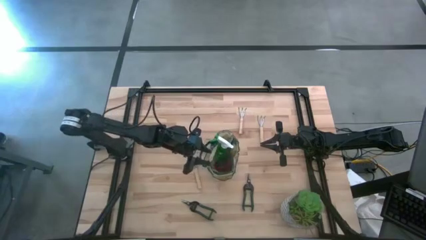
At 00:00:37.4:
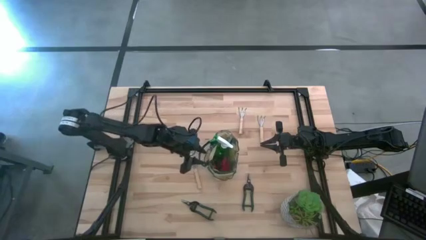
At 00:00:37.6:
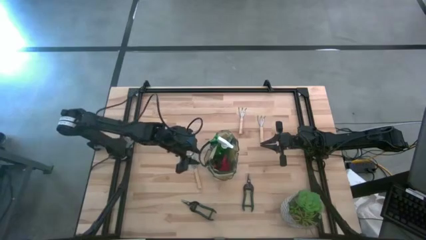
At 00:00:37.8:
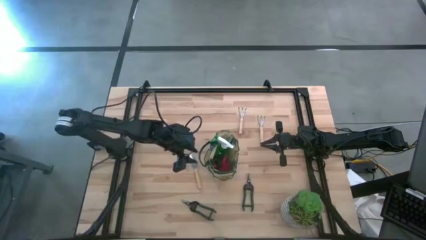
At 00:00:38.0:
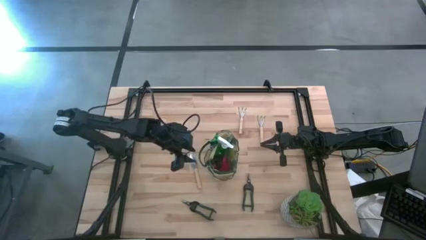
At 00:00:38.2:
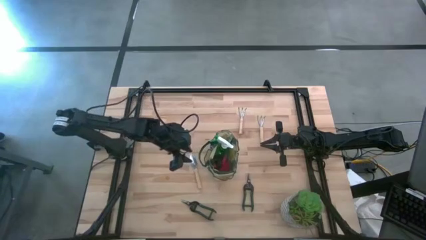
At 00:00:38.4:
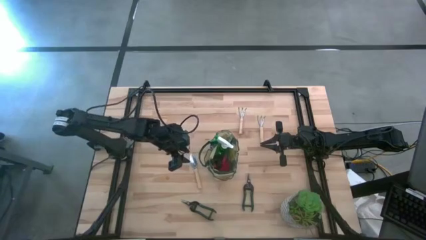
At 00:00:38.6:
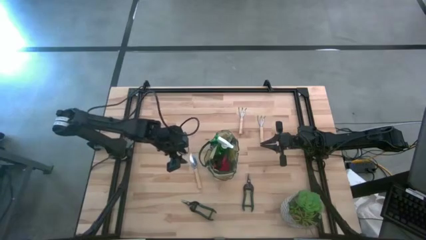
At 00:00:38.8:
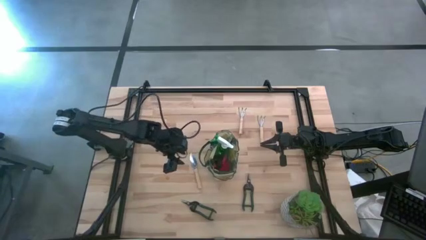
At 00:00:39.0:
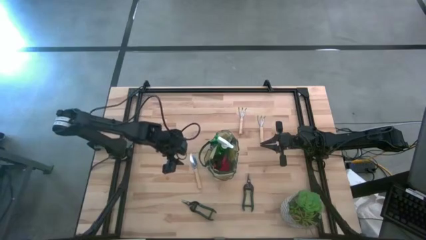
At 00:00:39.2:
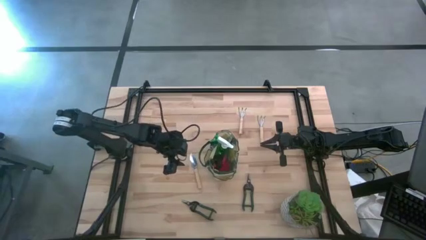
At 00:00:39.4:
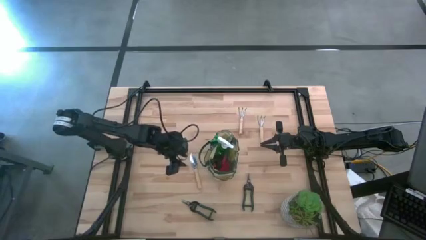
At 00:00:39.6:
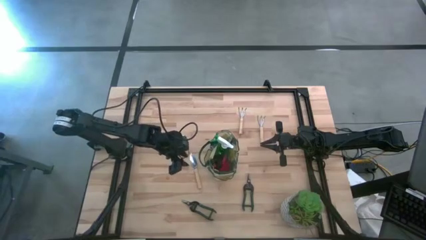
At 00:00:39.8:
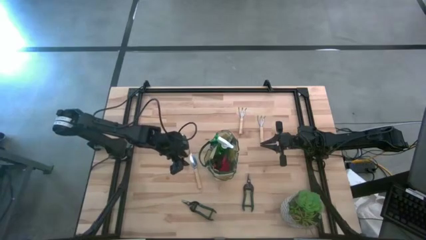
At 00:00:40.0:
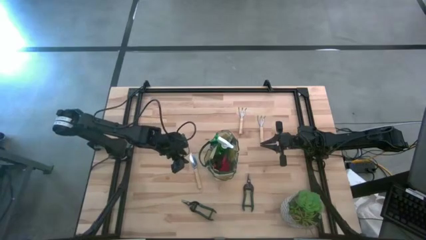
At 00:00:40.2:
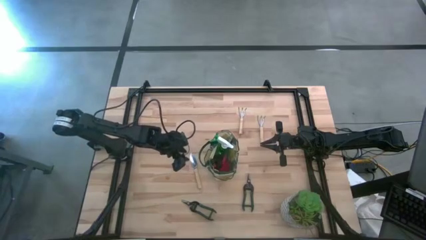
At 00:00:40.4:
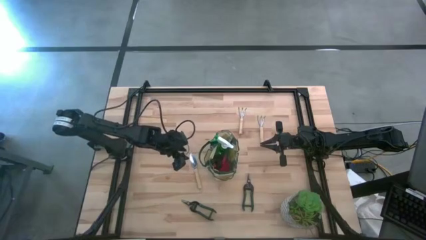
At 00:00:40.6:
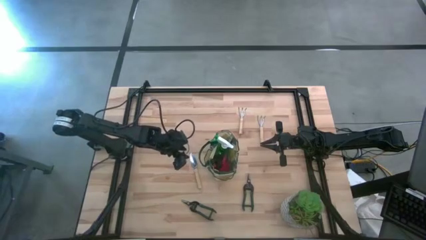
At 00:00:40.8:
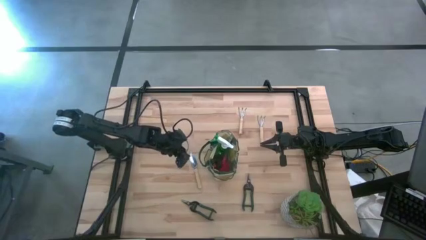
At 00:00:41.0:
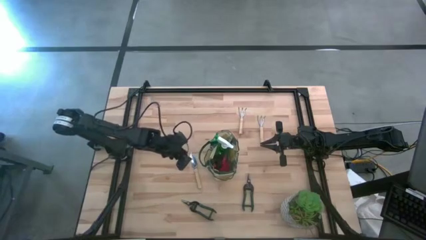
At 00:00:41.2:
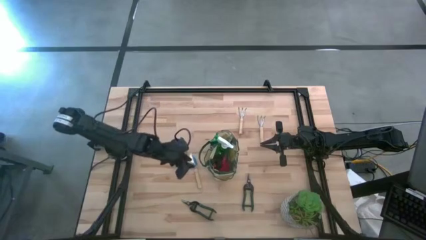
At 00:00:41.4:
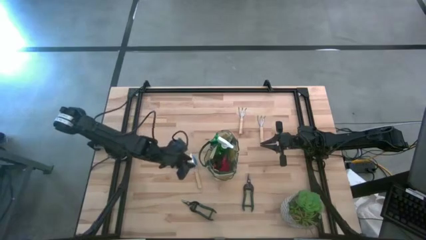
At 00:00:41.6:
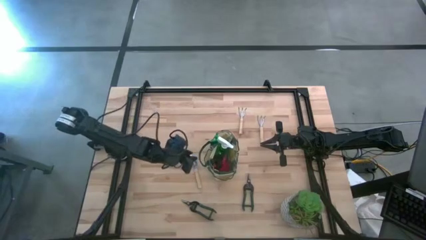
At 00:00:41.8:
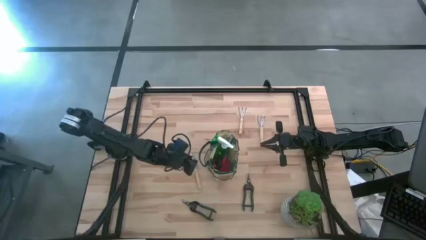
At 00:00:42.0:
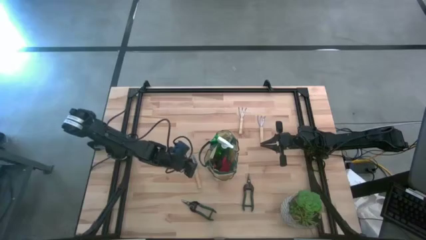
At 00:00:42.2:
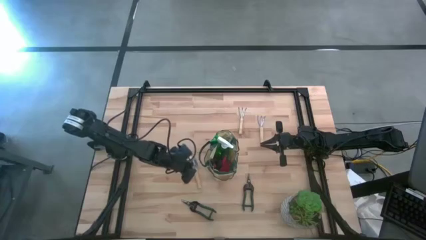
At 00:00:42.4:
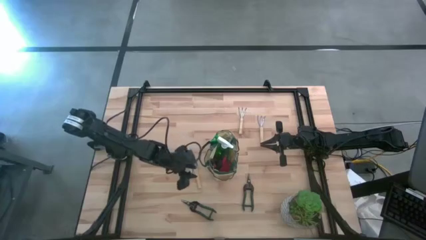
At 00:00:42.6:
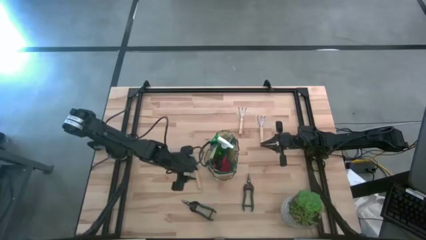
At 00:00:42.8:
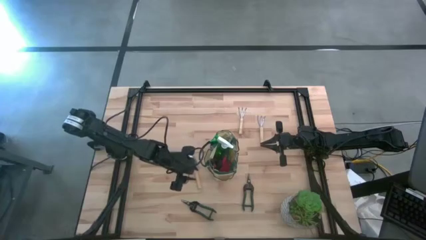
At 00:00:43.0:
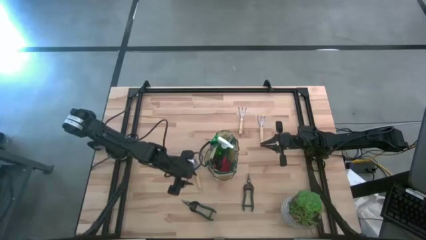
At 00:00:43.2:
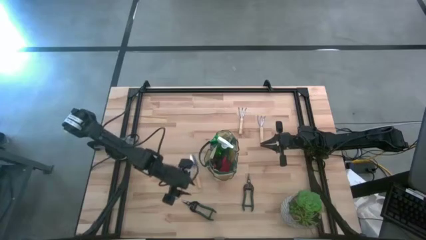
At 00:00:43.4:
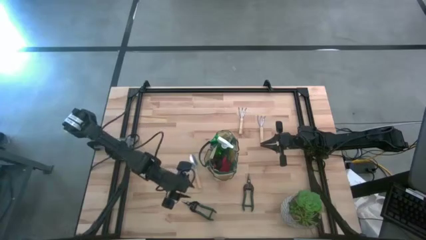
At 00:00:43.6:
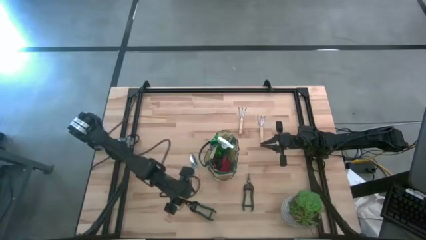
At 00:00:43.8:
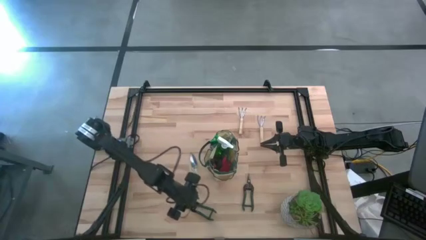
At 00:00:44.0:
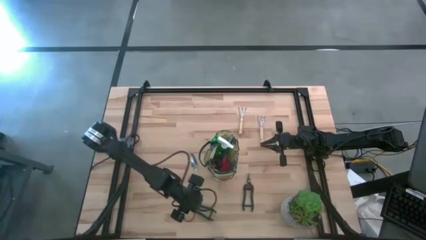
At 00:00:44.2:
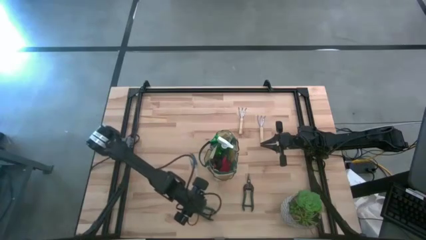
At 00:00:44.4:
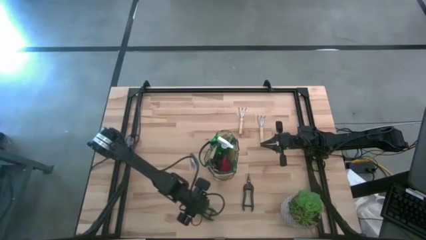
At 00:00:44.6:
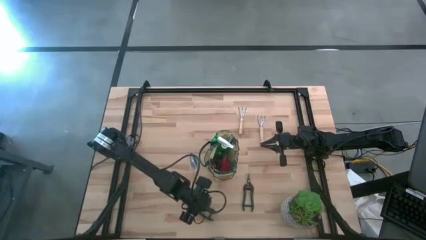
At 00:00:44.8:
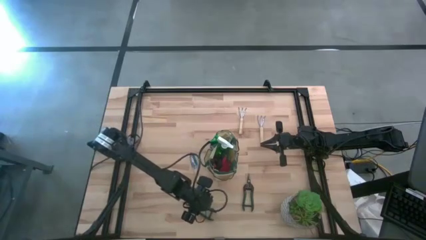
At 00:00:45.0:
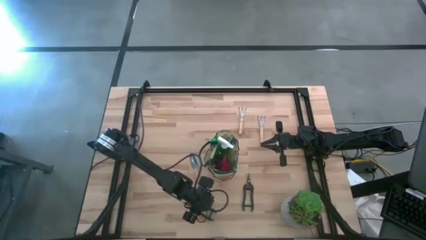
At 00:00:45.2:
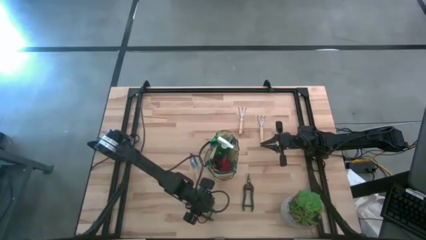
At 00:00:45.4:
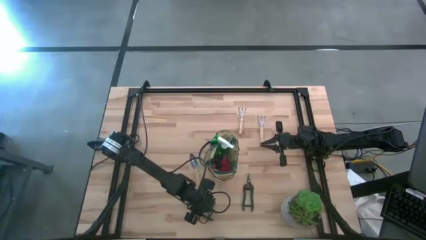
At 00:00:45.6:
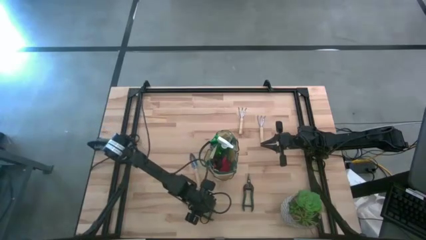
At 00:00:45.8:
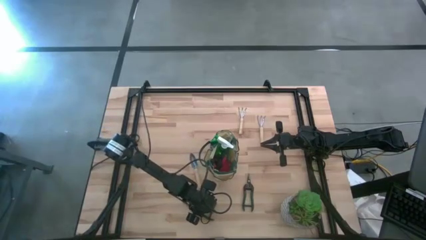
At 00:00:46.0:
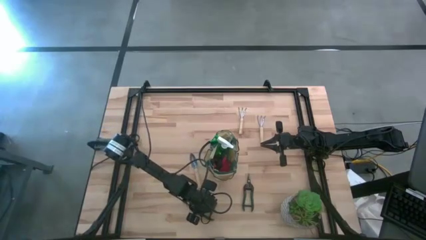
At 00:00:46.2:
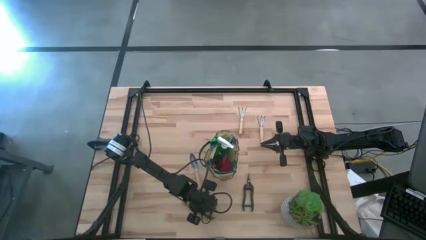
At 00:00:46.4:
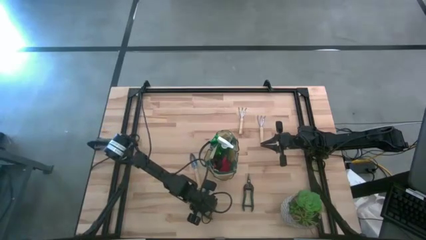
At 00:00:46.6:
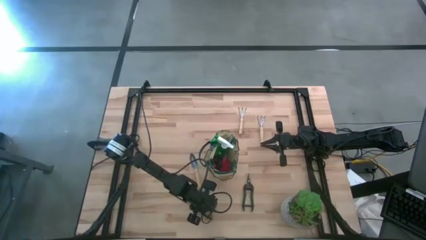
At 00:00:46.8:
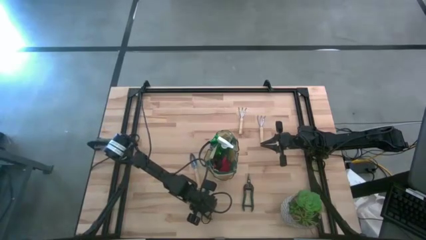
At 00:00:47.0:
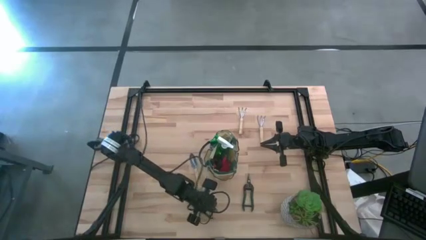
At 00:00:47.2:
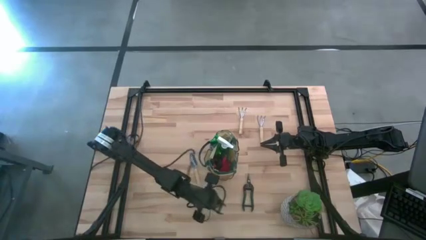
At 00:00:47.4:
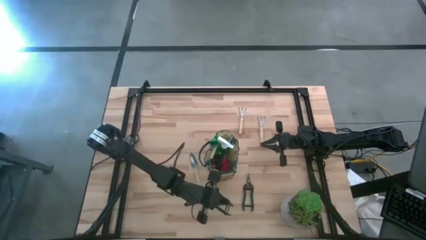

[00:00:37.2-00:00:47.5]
Task: Pick & Place Garden tools in Gardening bag
Put the left green shear scissors into the white gardening bag

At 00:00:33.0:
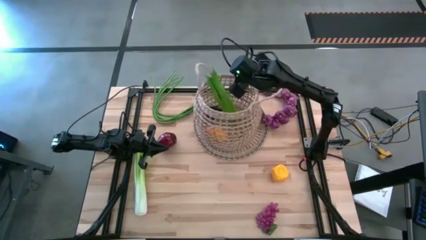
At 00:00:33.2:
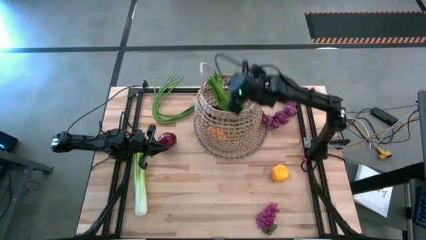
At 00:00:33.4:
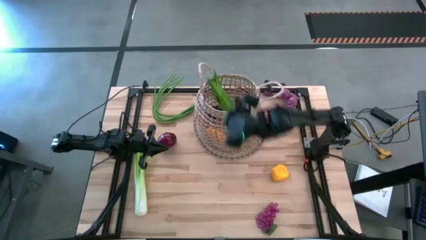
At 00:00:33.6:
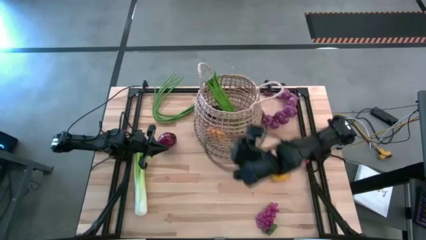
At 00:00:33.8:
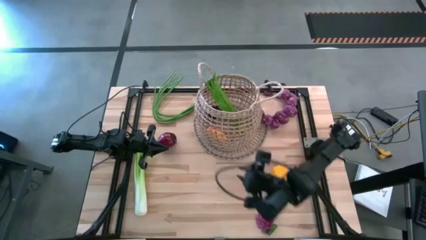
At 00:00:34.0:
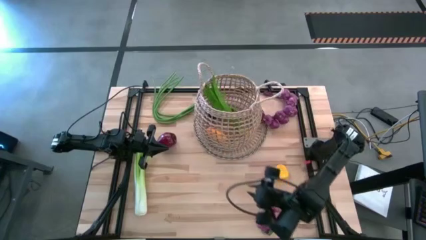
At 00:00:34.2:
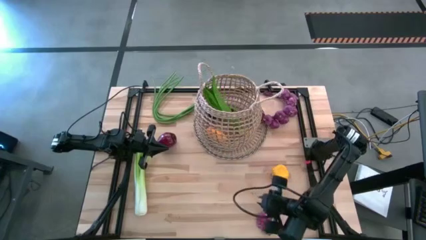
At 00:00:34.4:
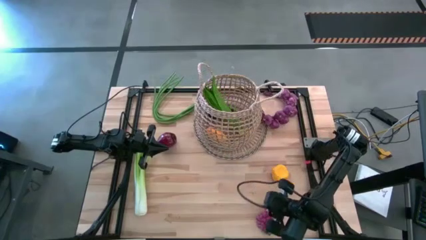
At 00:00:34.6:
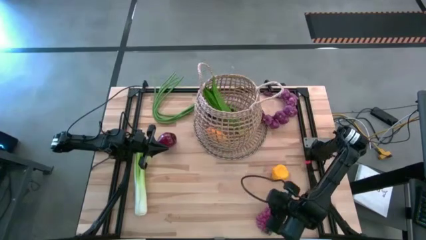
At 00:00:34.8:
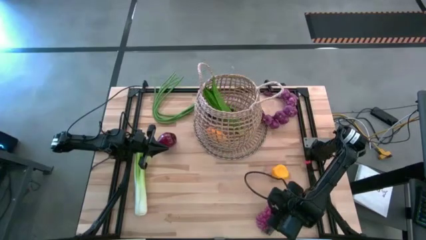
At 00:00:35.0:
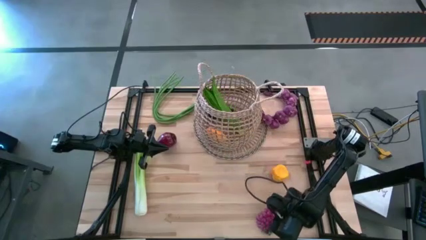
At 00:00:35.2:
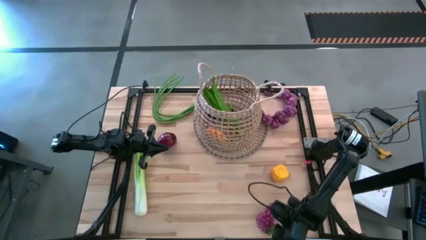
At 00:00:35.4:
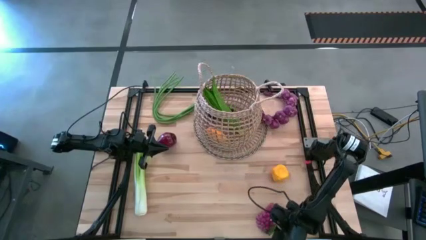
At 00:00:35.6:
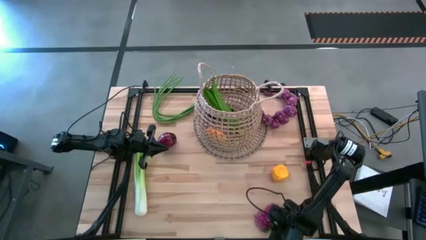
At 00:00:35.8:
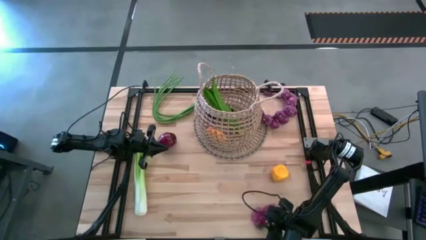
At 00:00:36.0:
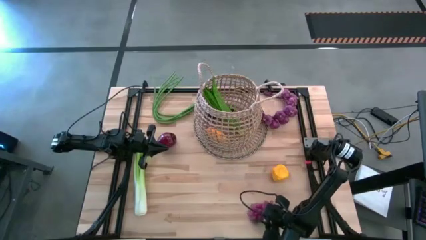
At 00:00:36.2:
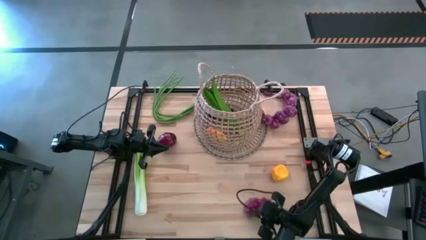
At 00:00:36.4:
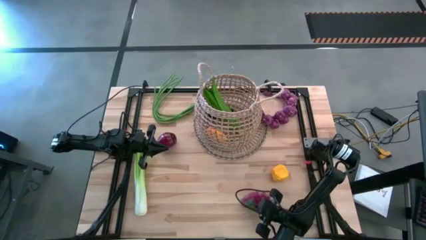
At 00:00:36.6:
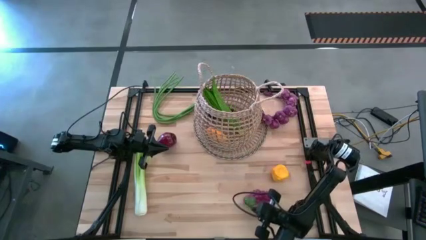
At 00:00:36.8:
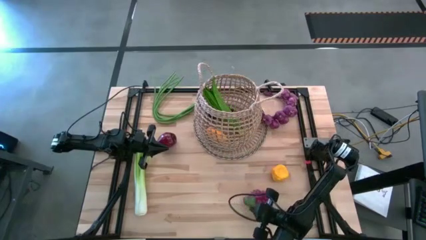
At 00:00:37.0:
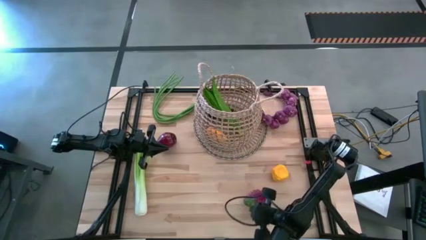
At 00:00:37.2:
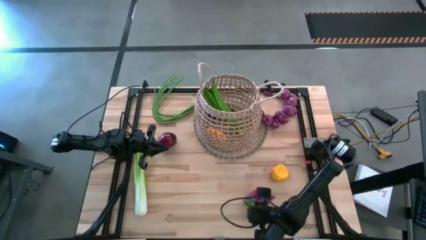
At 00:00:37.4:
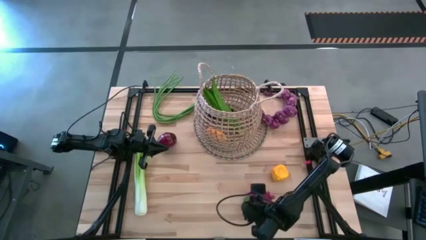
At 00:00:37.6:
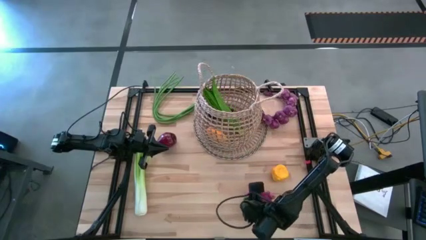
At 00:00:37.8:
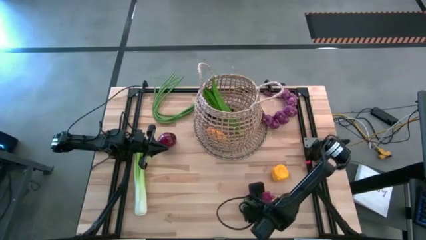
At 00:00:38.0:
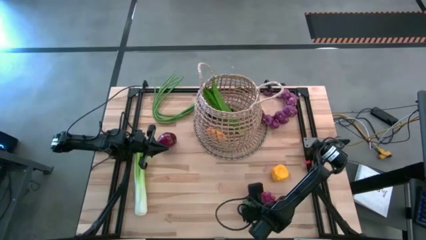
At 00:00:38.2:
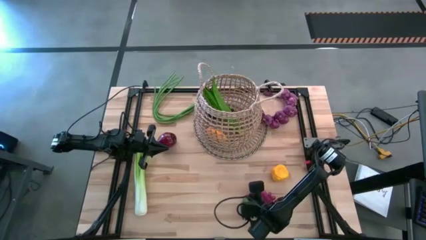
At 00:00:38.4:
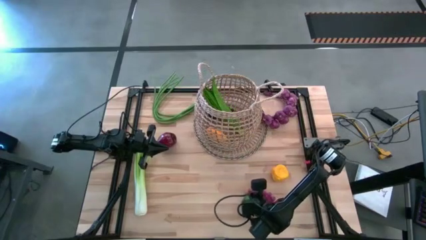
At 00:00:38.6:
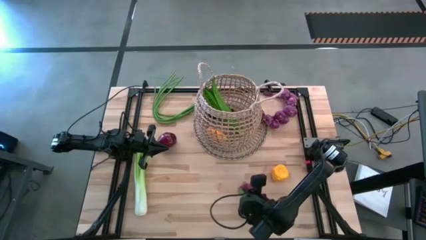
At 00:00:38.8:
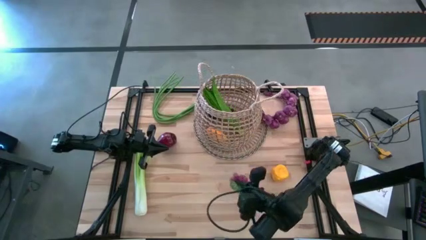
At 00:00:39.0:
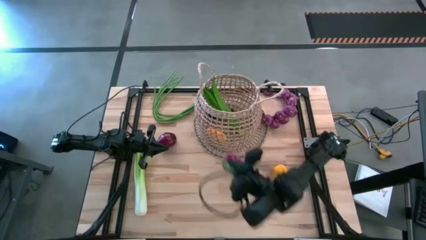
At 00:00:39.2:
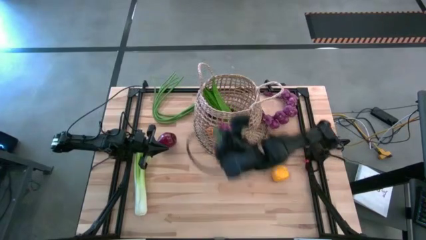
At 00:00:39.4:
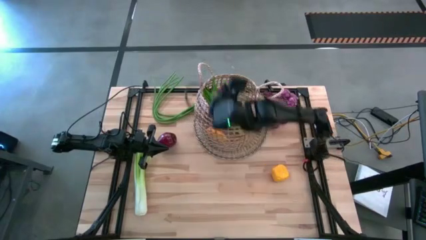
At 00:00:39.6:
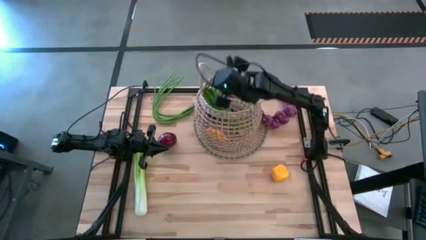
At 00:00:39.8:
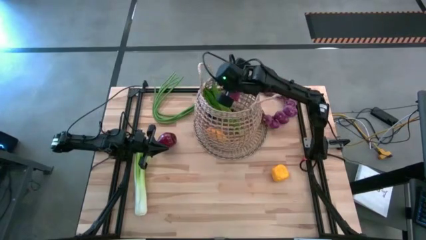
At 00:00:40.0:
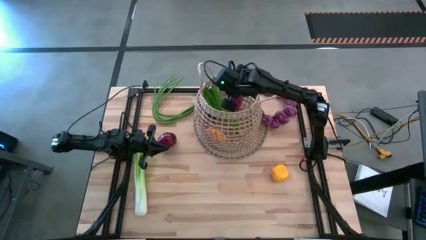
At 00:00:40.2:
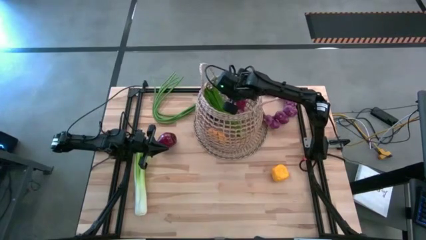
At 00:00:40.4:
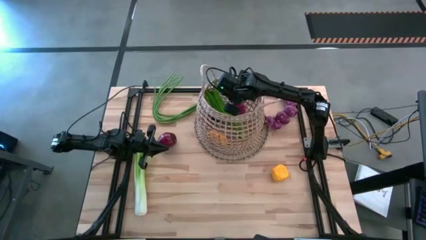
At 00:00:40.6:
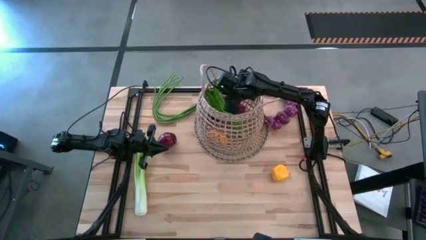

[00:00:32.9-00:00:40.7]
Task: Build produce basket
Put the purple grapes into the light brown basket
